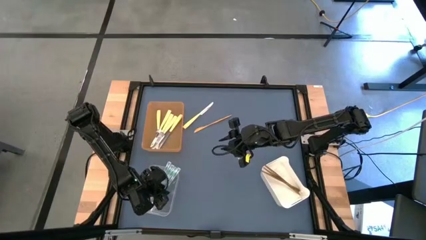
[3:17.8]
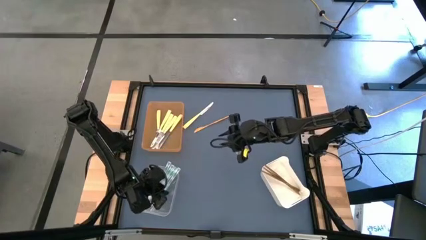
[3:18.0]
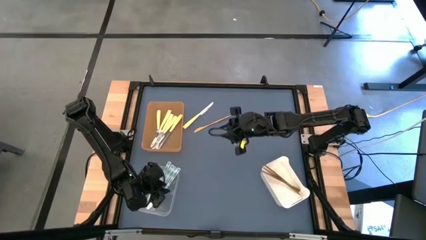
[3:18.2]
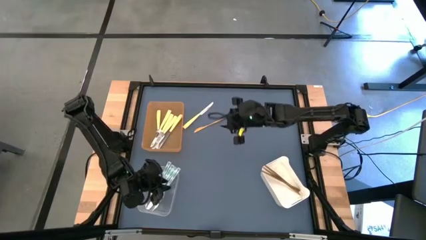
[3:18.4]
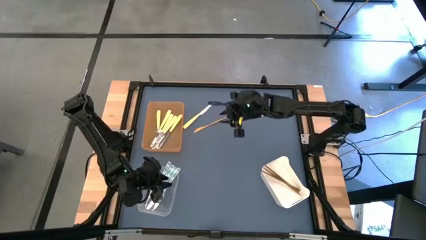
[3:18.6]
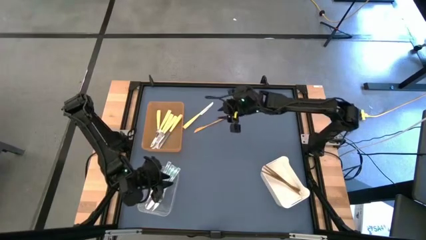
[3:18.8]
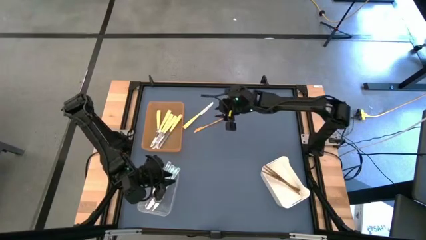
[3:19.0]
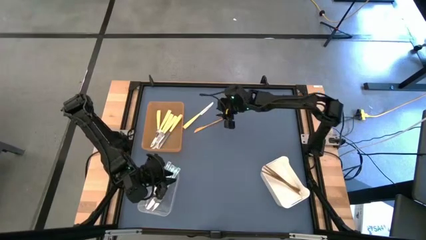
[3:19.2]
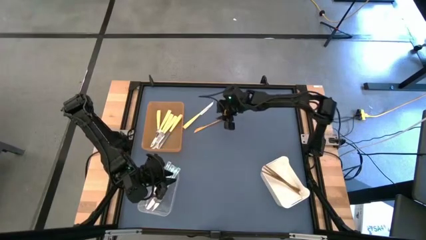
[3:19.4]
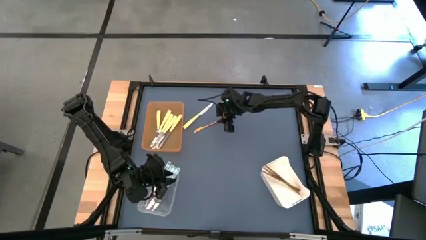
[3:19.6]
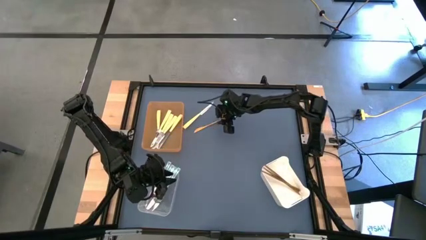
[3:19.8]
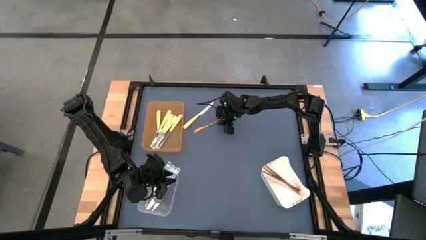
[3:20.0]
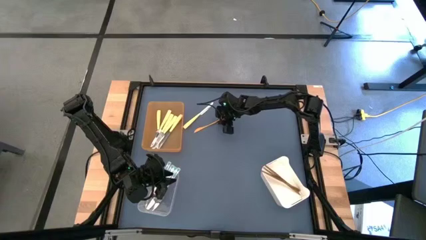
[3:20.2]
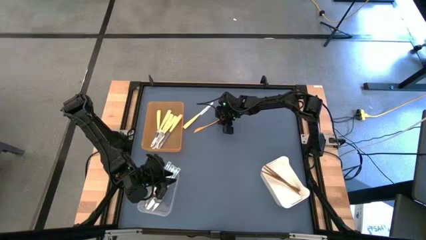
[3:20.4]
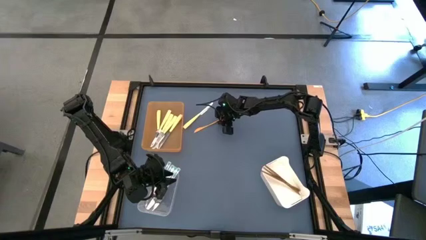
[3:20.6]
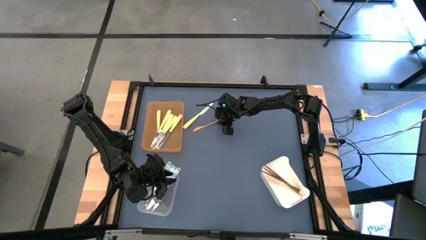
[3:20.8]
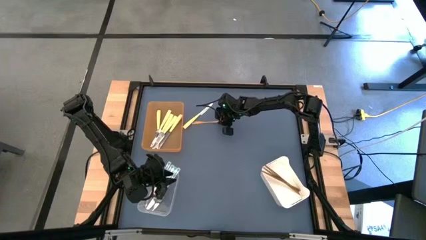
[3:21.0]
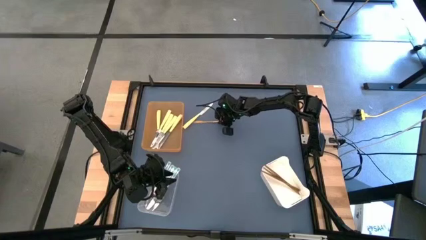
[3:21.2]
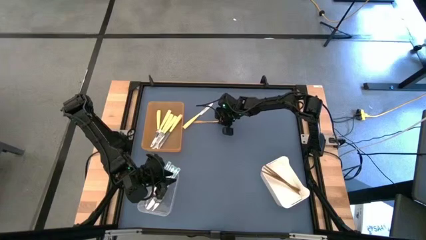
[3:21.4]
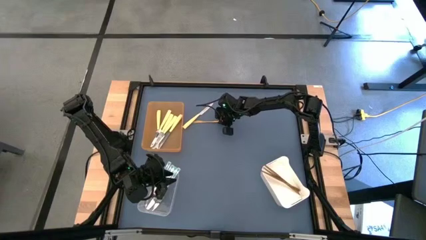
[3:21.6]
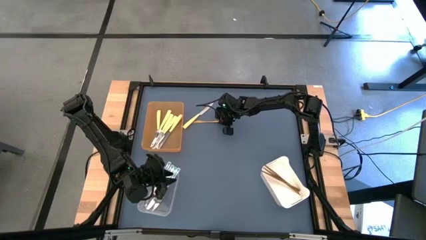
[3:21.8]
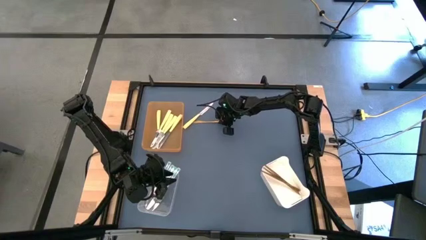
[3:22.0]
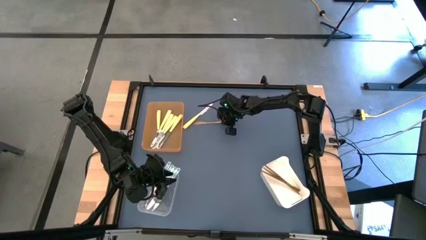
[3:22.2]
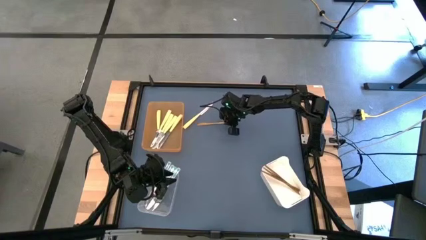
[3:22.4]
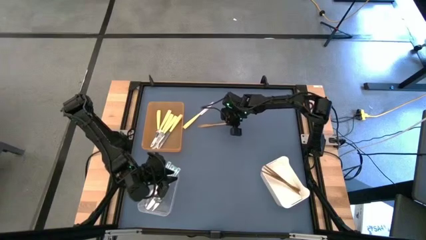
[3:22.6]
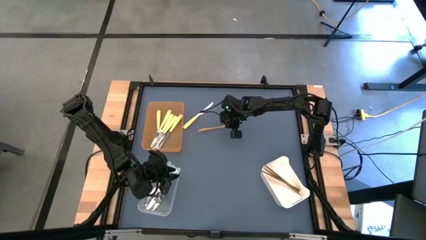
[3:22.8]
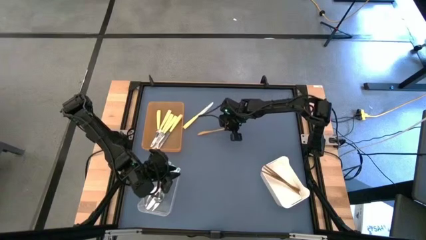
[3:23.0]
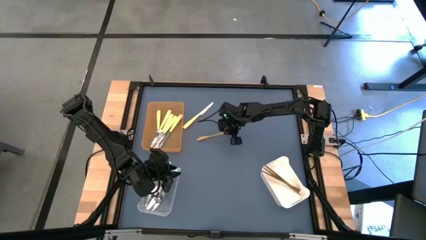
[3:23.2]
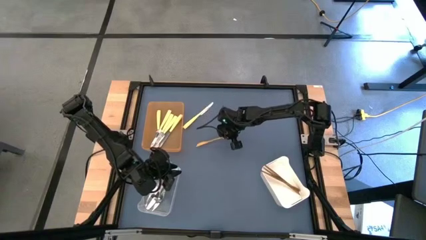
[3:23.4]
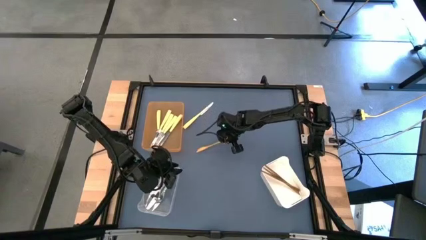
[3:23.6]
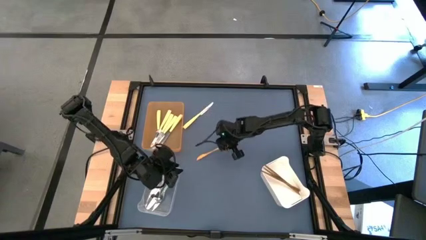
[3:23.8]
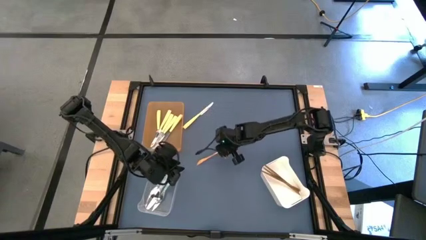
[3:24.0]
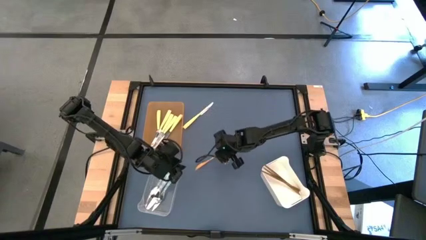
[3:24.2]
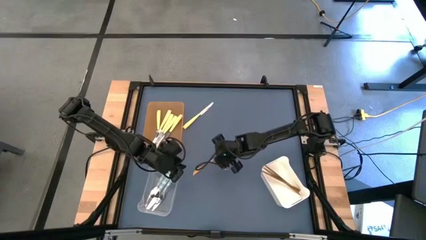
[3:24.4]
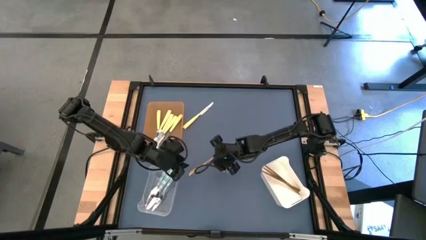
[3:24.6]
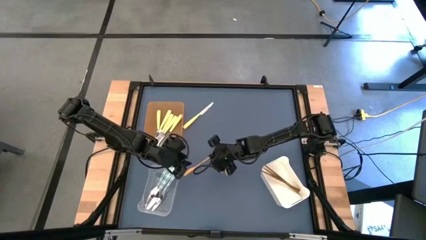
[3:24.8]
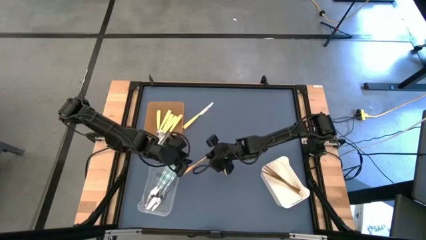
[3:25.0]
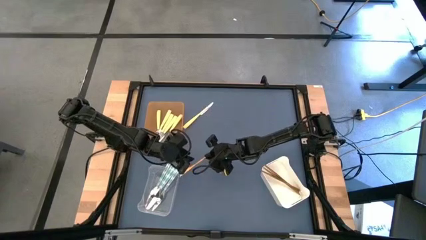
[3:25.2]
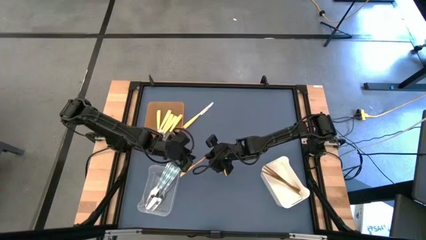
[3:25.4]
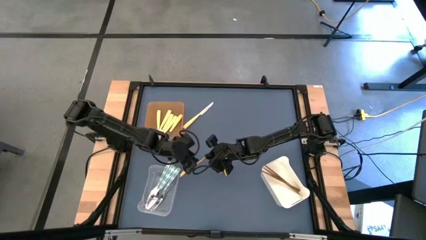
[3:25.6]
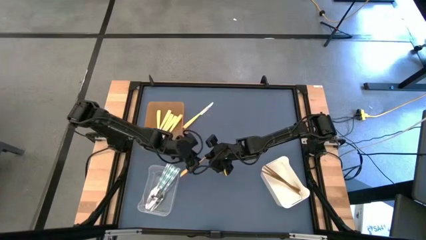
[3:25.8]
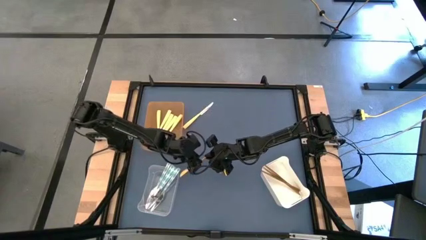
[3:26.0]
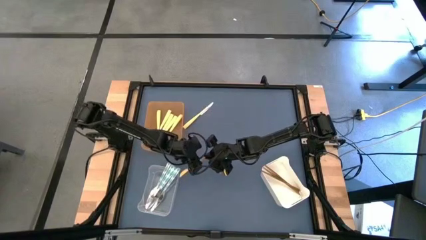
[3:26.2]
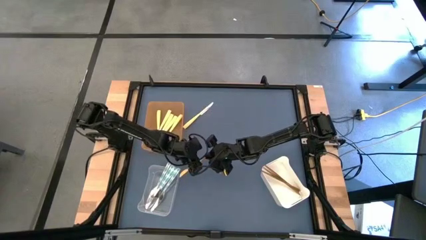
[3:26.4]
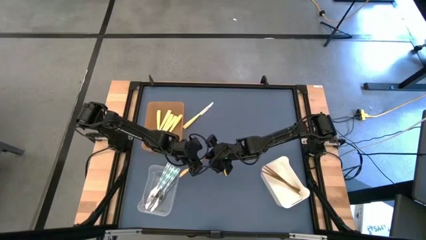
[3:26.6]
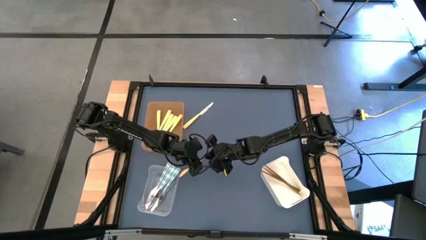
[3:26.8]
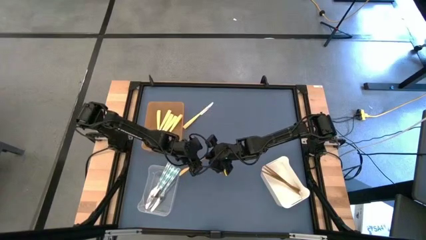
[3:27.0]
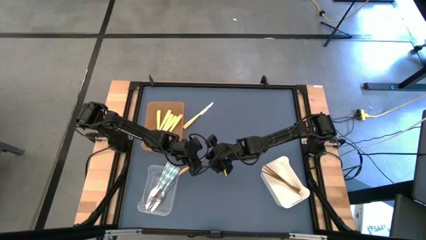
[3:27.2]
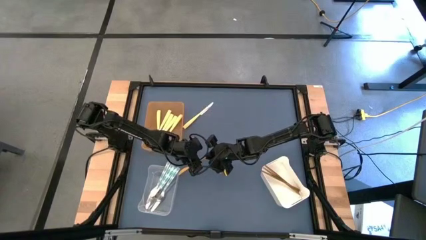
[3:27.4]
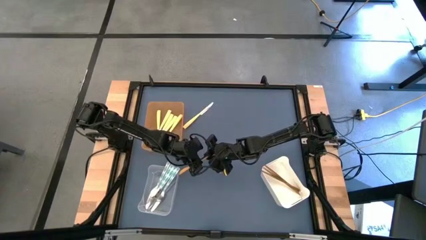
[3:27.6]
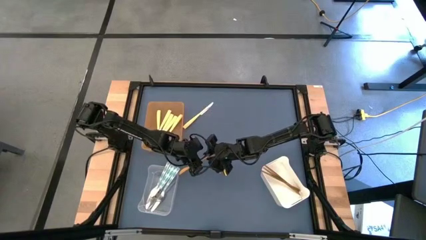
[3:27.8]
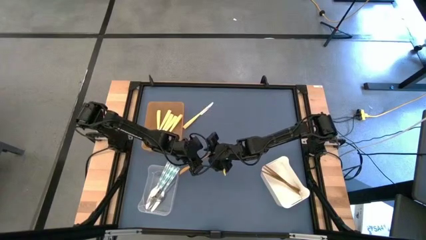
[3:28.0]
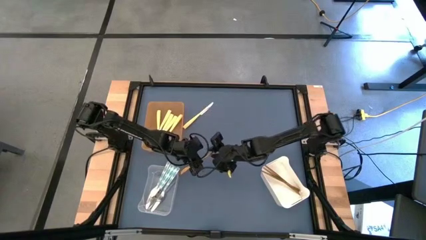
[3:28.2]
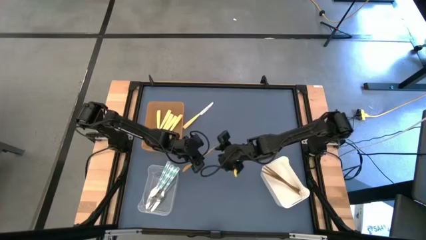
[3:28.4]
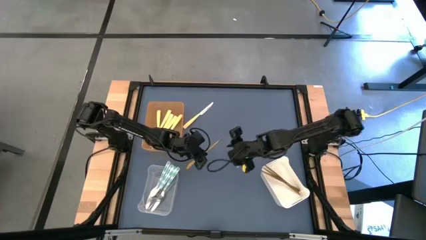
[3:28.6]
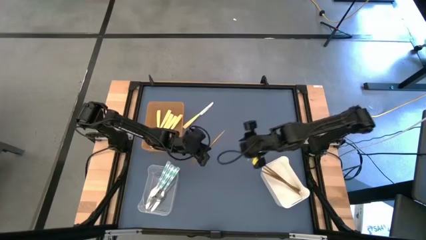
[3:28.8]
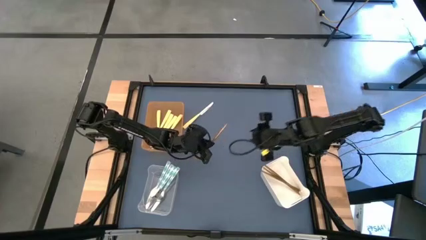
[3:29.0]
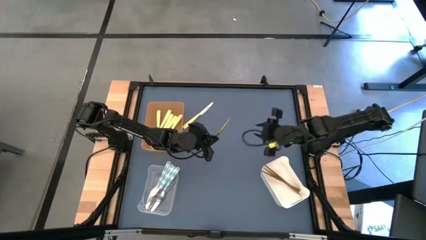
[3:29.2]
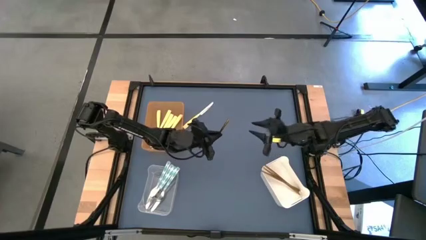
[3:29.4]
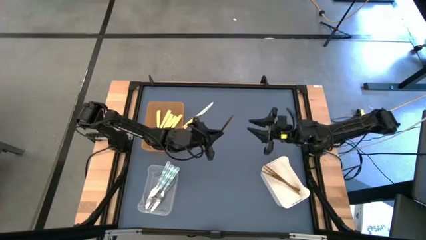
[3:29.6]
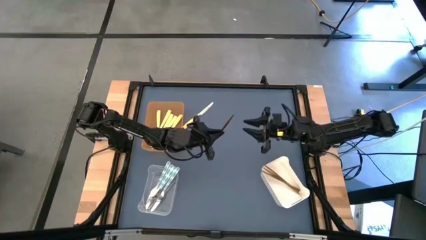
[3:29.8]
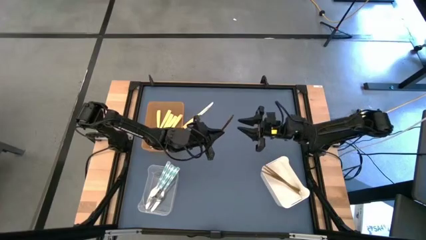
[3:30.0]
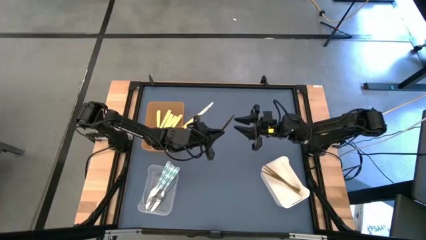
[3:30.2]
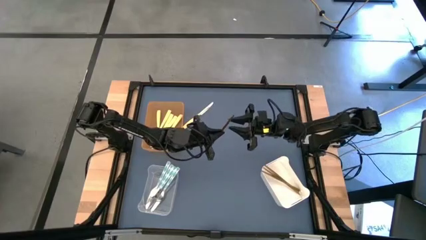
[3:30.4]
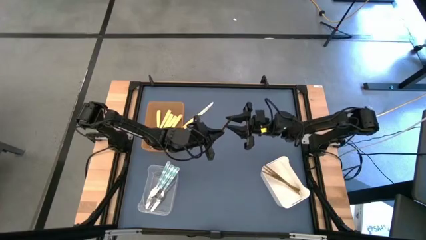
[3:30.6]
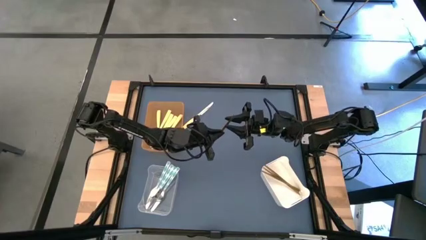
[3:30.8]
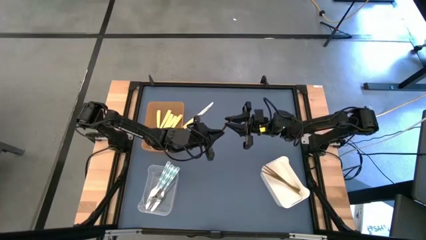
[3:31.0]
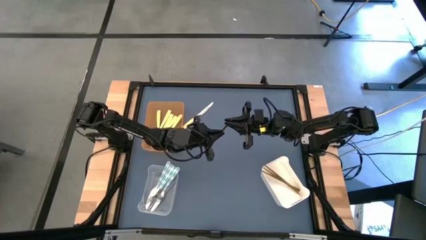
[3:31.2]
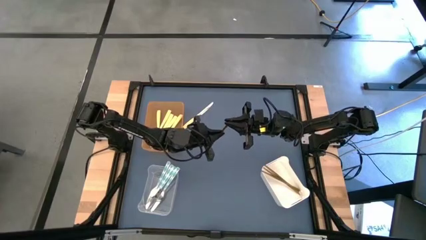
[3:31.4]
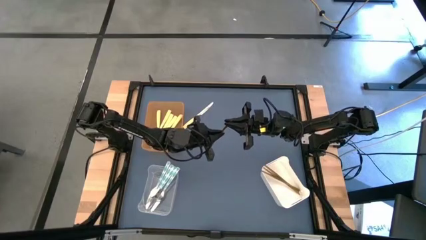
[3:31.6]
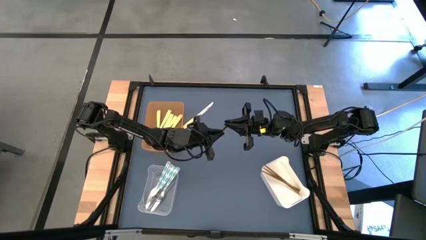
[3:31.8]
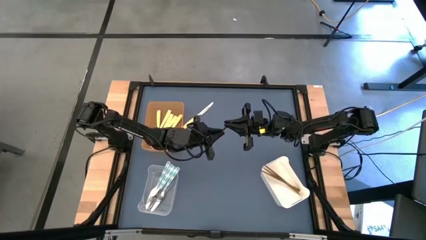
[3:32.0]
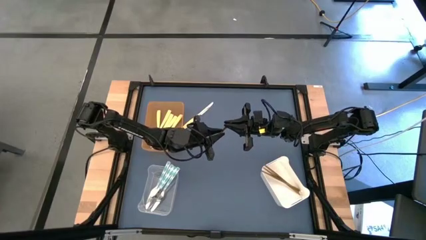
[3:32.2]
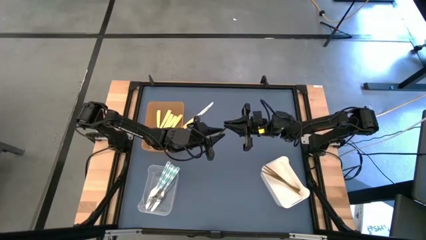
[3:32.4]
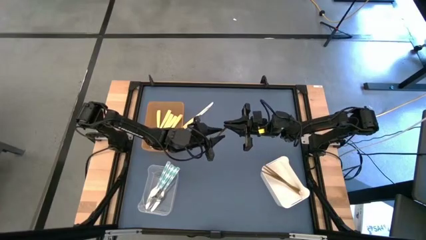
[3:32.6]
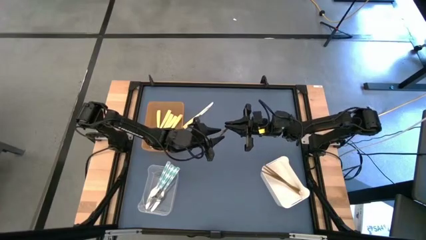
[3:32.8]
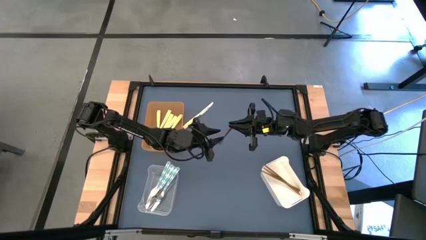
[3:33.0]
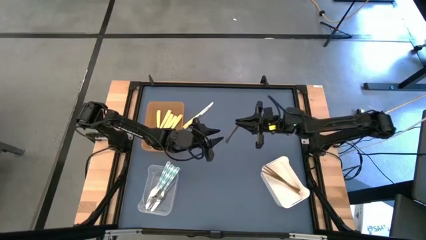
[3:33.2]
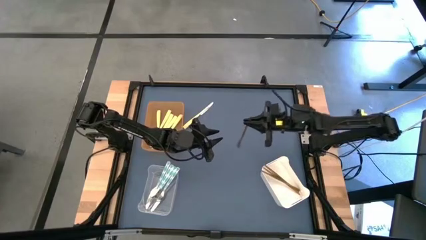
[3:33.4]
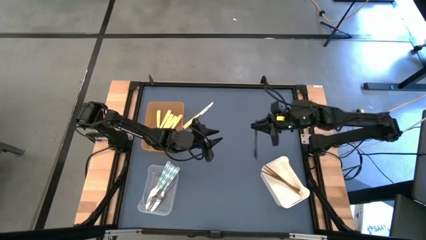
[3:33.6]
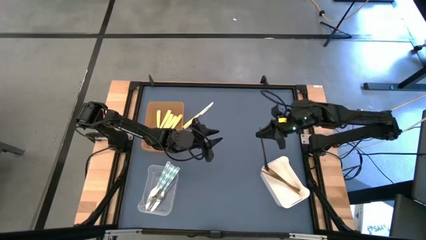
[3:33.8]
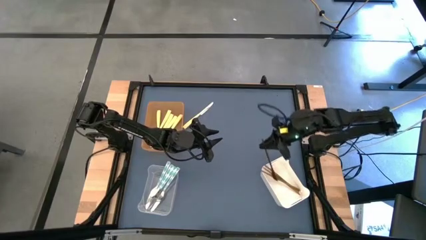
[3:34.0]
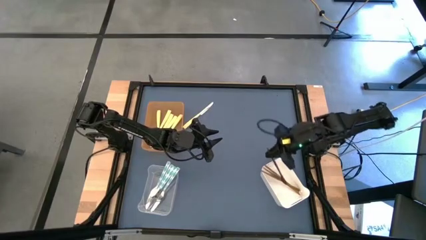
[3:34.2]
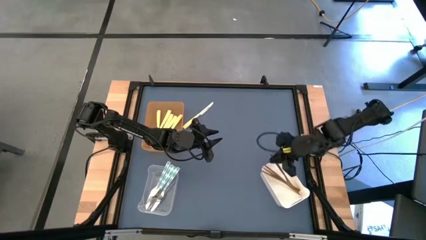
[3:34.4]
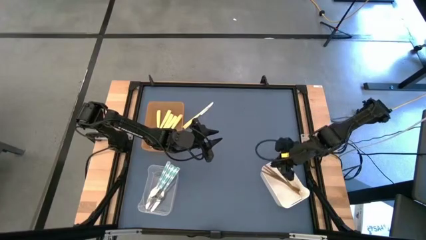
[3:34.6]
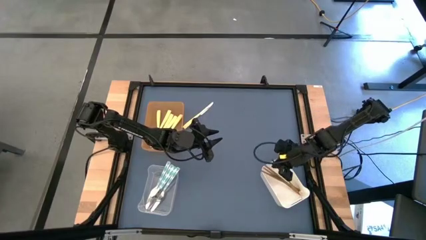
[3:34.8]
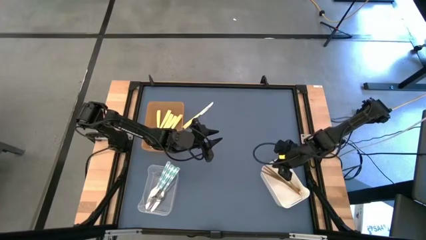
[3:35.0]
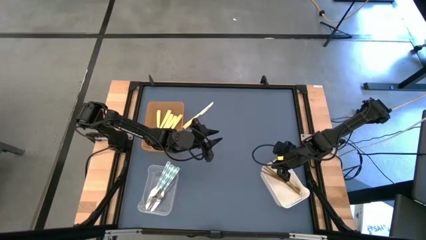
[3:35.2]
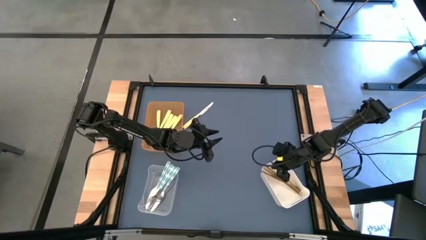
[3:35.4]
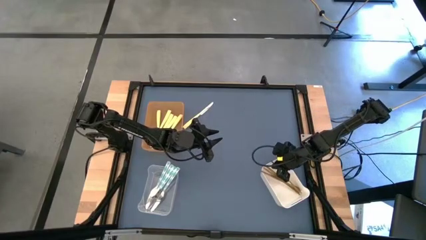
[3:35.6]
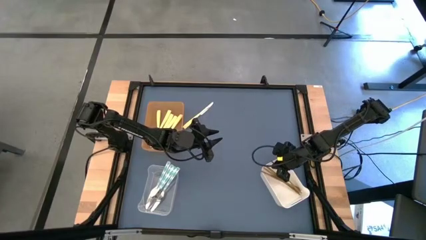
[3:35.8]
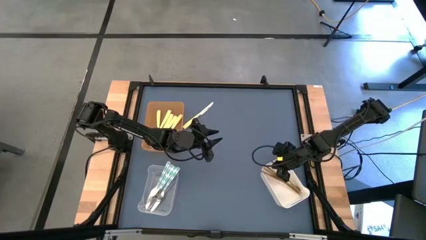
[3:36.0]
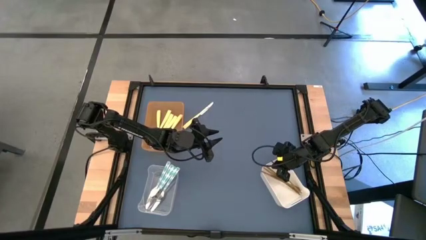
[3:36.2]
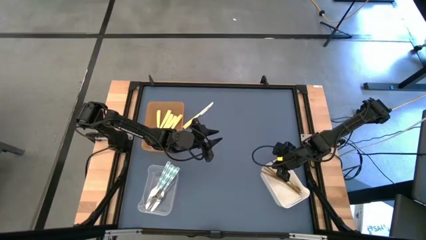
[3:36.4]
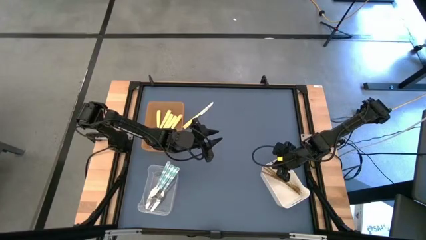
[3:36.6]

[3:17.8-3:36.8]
Task: Sort silverware by color (type)
Put the gold knife into the white bin
